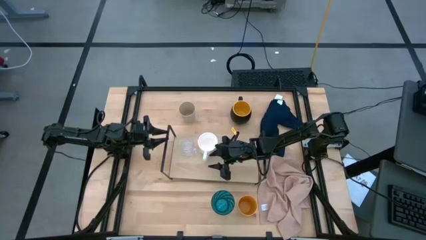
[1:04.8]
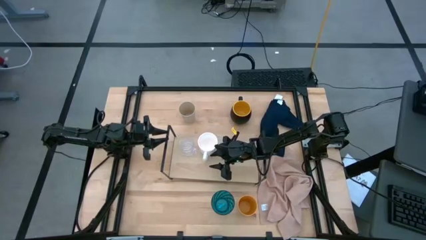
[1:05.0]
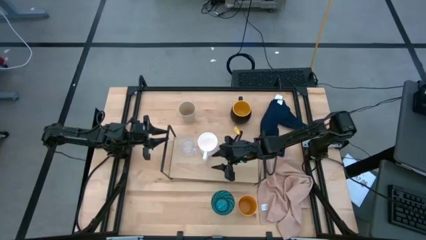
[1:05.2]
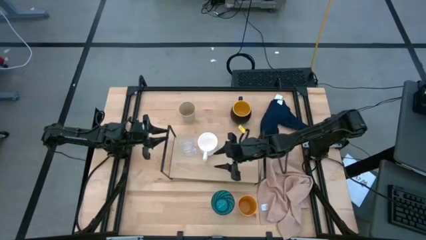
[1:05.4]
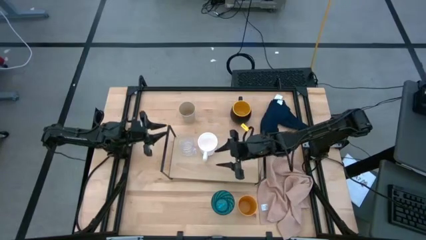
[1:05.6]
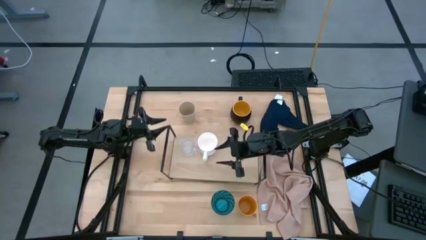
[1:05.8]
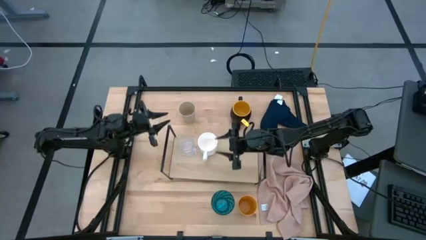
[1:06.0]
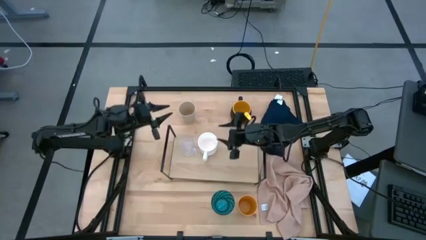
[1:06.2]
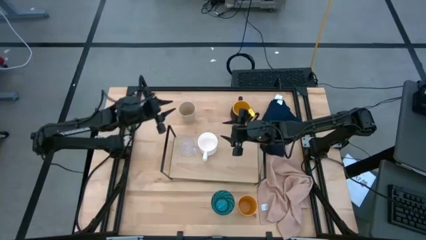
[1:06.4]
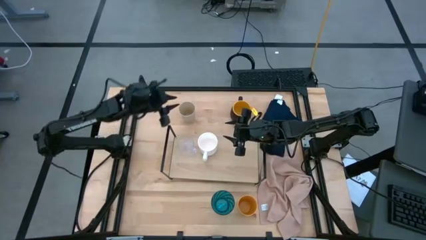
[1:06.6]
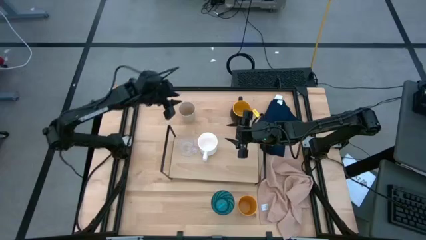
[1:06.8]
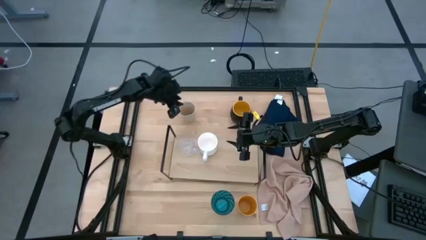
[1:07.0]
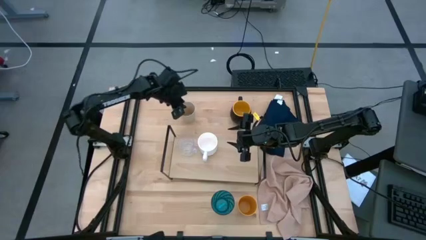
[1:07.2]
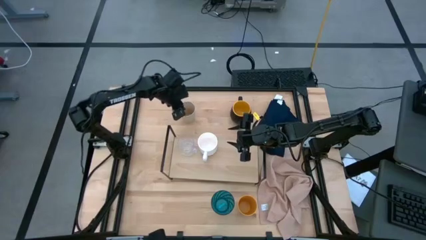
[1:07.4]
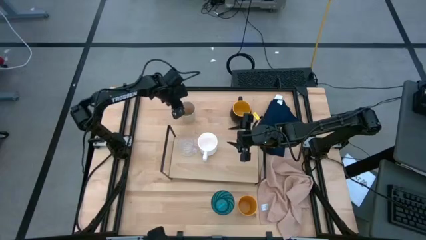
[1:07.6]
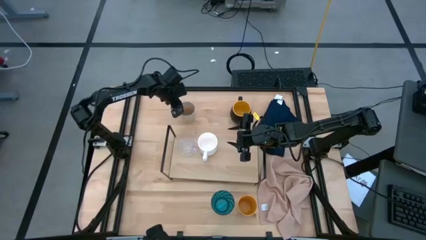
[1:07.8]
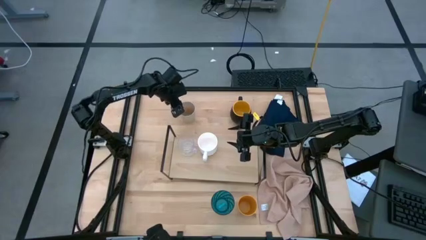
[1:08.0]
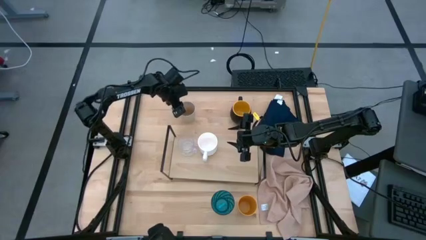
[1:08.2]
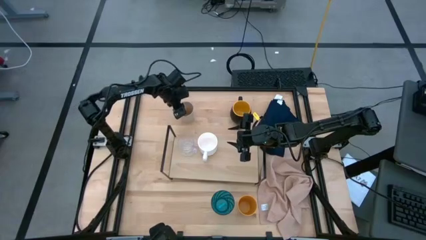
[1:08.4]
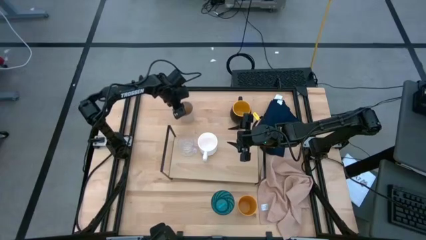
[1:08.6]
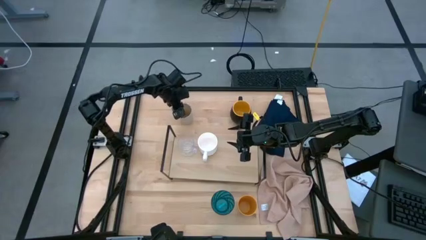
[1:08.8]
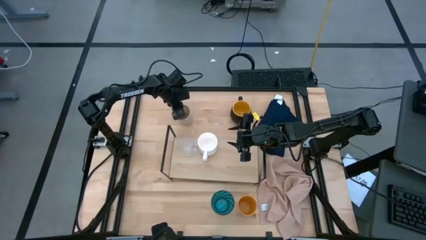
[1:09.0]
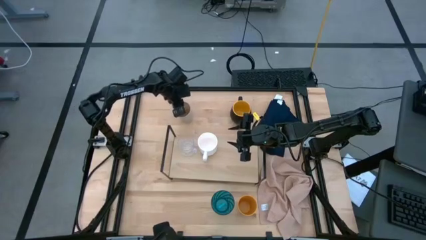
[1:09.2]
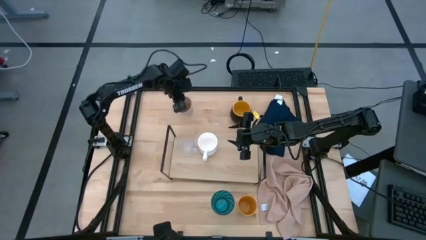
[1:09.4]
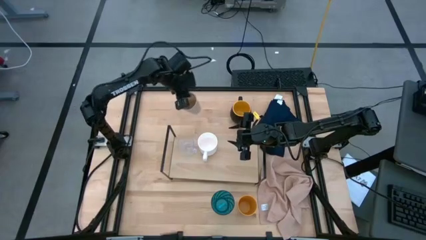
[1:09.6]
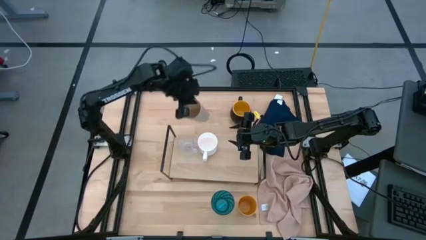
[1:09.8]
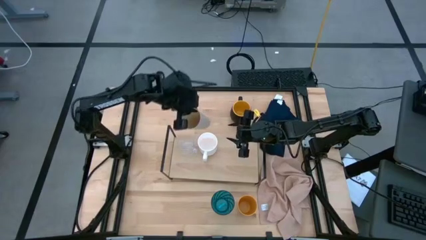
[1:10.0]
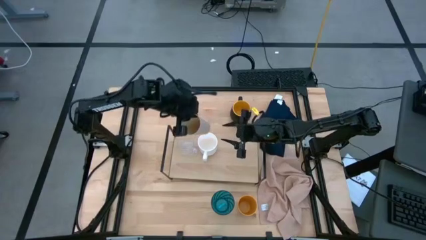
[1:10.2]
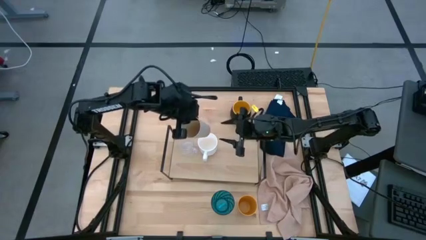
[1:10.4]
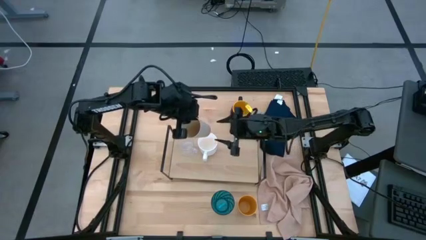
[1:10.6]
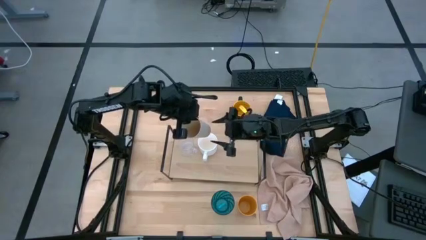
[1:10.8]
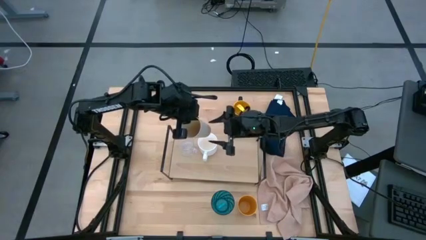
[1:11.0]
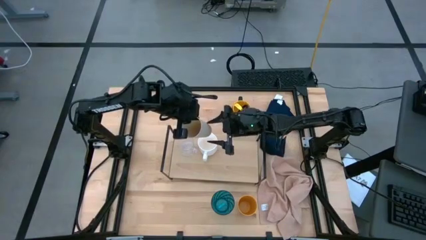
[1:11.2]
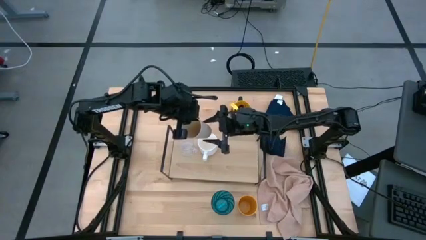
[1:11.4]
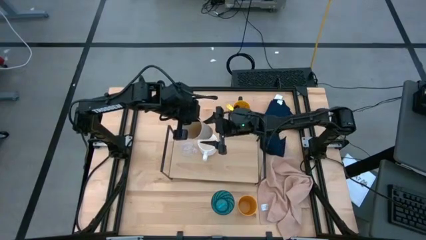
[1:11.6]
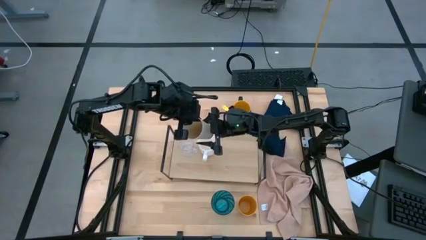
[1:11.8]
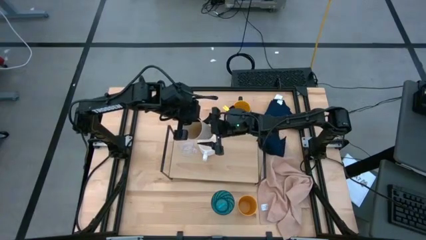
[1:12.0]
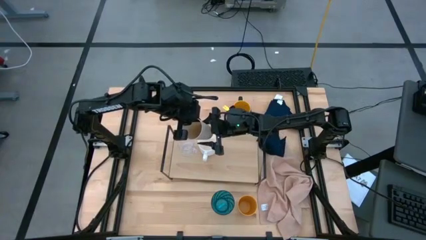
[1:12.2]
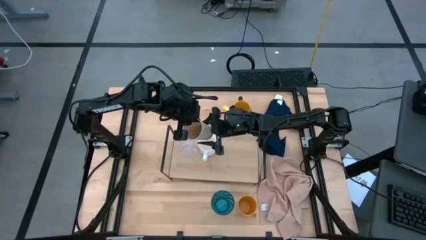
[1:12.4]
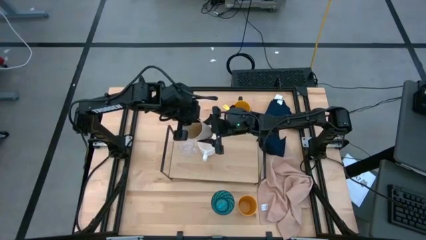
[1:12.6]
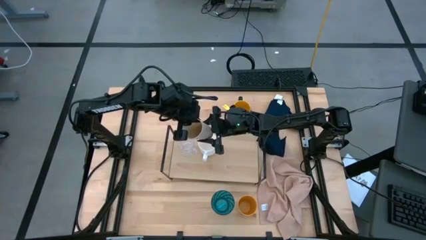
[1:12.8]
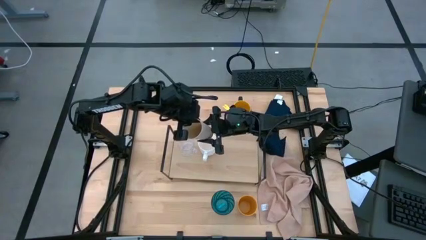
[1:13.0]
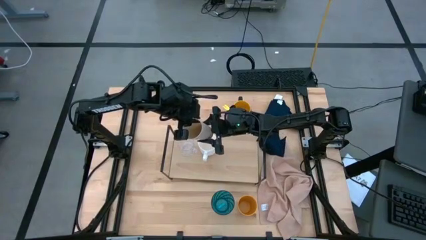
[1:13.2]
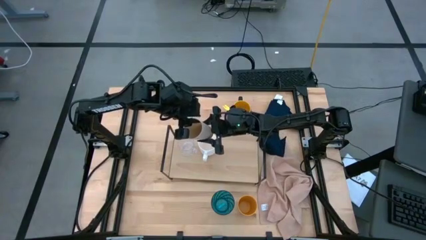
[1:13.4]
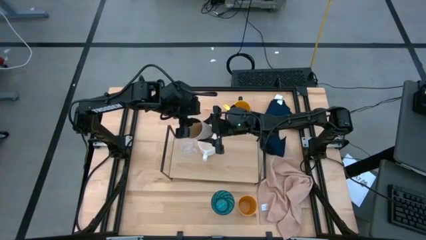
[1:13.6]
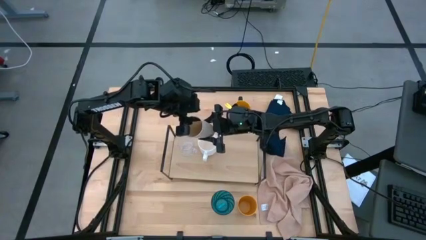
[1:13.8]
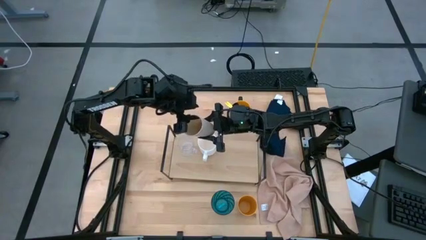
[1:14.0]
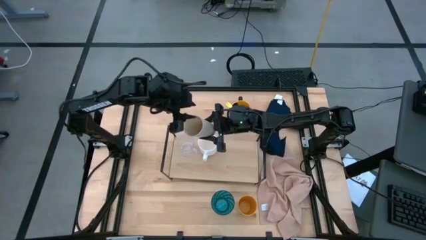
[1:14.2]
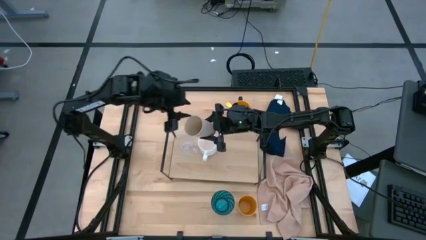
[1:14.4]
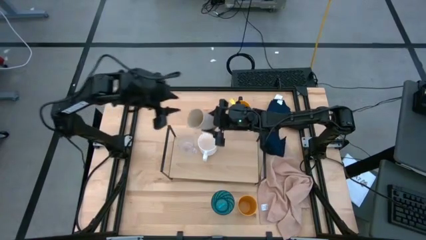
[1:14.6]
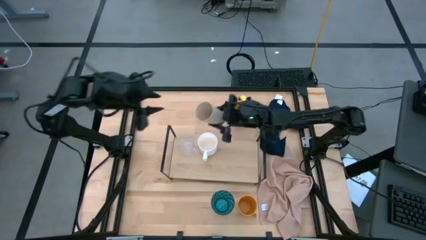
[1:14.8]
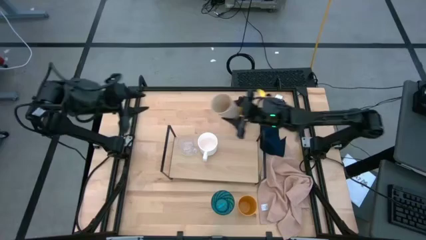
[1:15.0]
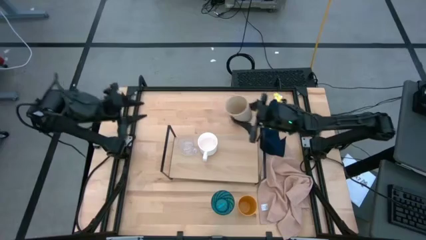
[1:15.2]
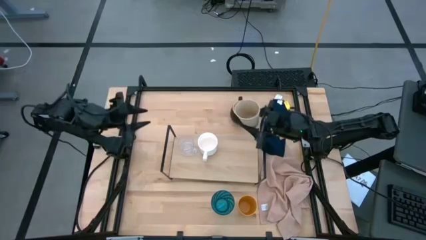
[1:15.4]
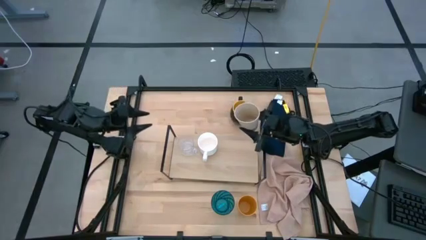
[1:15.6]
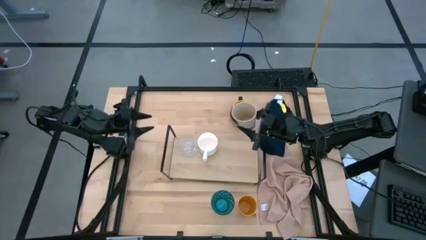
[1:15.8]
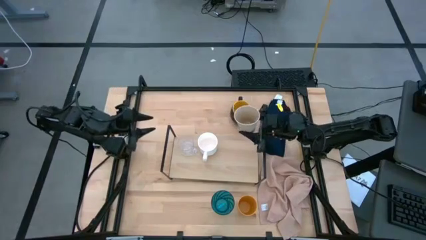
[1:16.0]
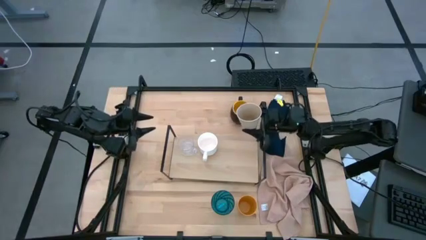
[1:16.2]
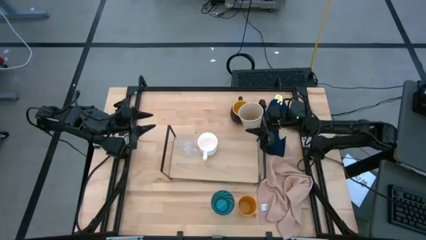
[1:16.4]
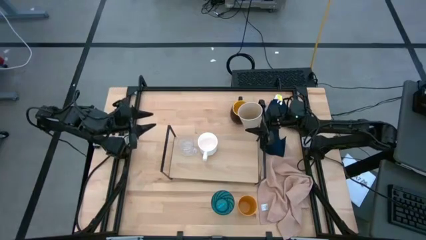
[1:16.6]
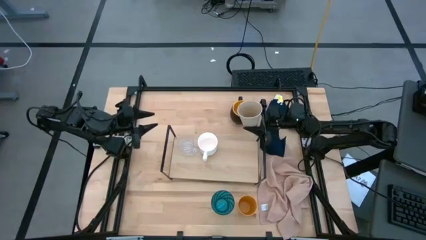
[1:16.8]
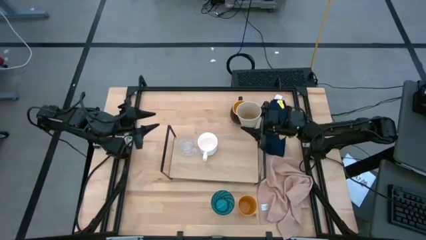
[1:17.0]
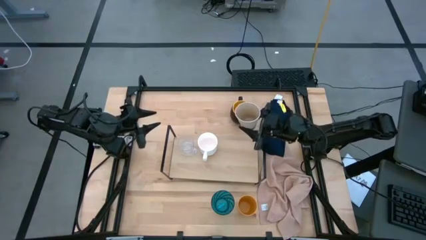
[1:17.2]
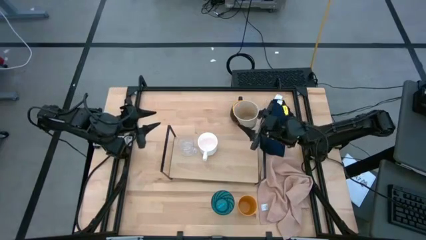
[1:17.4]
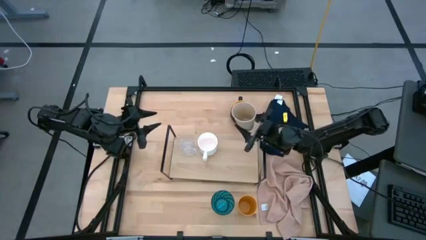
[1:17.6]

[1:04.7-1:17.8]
Task: Stack small to large cups/mugs on shelf
Put the white cup on the shelf

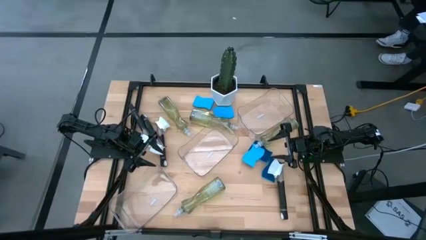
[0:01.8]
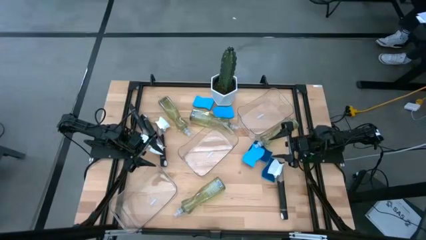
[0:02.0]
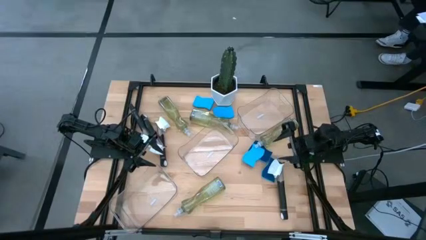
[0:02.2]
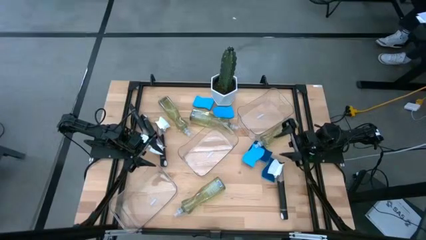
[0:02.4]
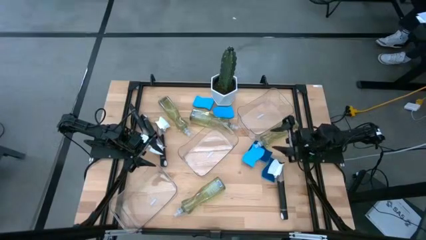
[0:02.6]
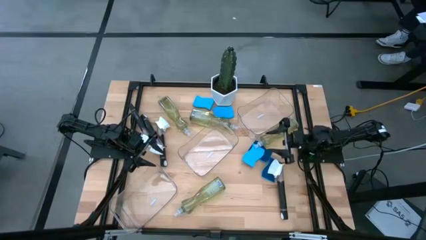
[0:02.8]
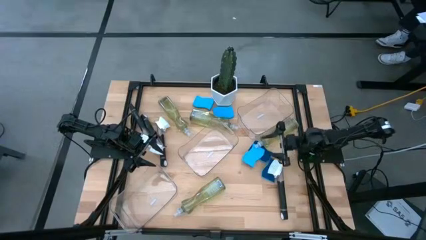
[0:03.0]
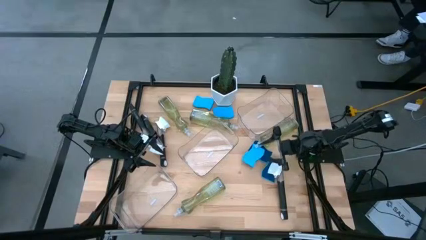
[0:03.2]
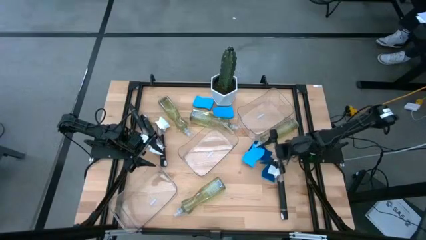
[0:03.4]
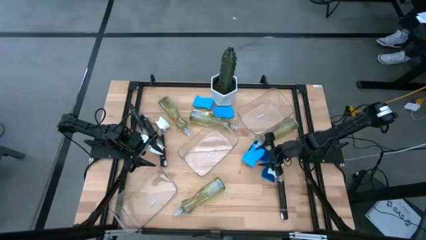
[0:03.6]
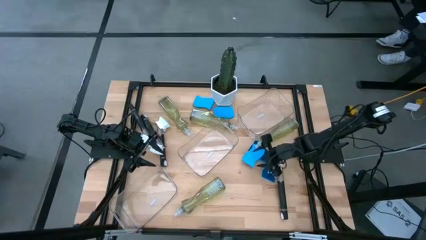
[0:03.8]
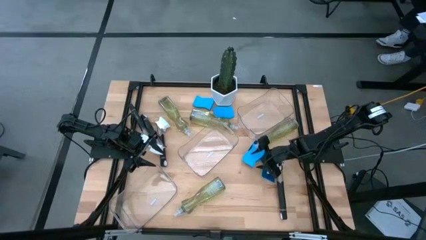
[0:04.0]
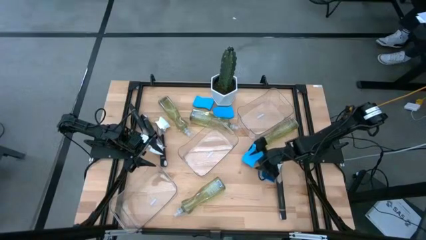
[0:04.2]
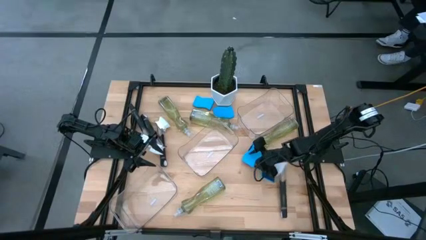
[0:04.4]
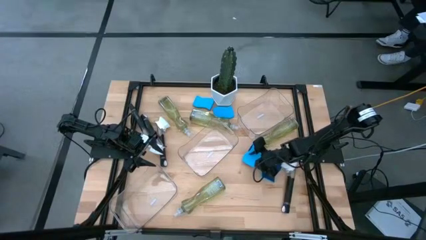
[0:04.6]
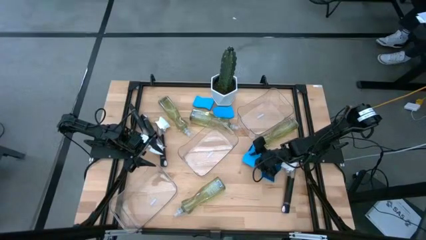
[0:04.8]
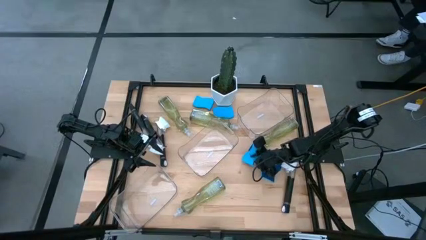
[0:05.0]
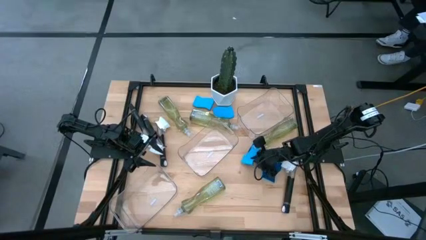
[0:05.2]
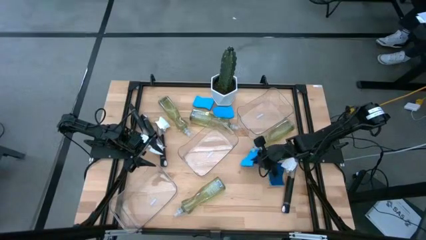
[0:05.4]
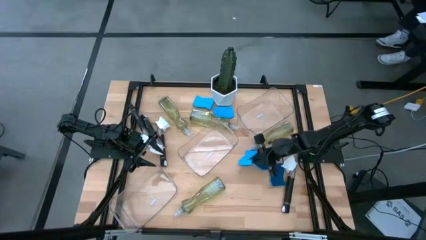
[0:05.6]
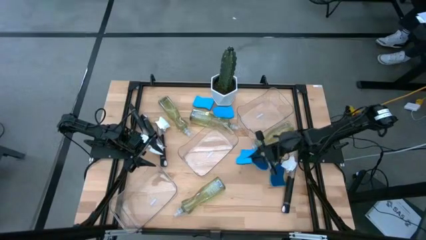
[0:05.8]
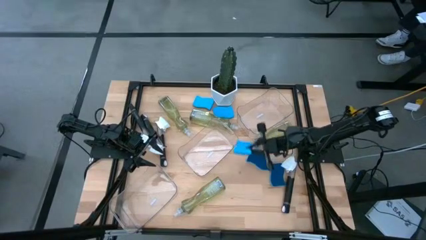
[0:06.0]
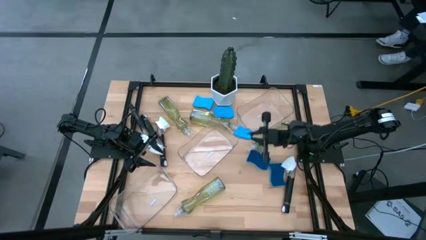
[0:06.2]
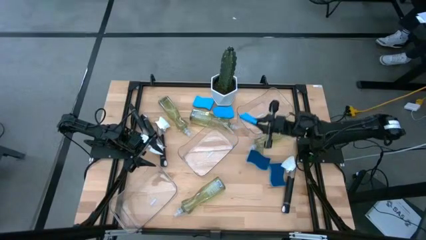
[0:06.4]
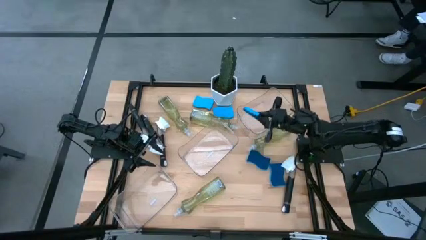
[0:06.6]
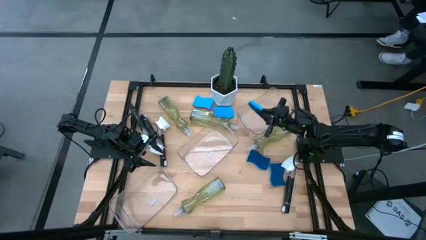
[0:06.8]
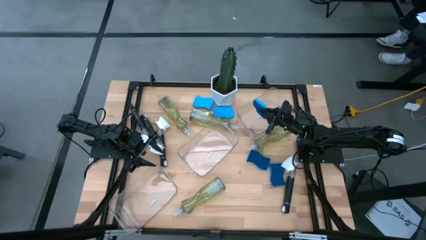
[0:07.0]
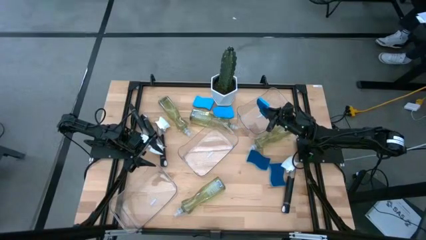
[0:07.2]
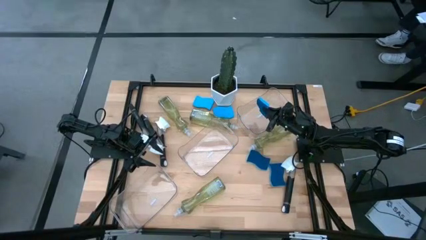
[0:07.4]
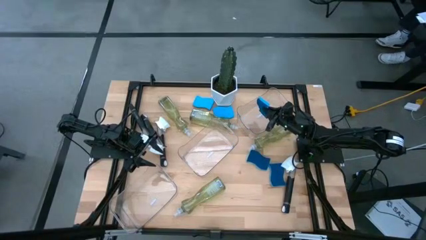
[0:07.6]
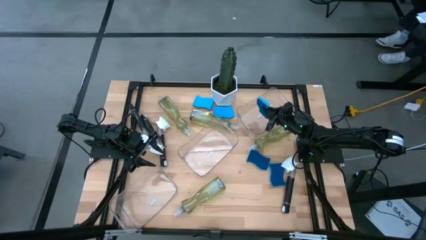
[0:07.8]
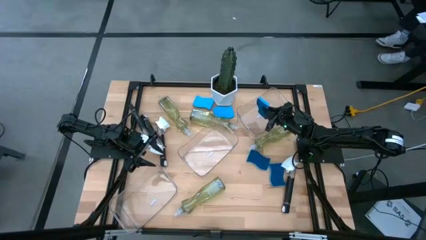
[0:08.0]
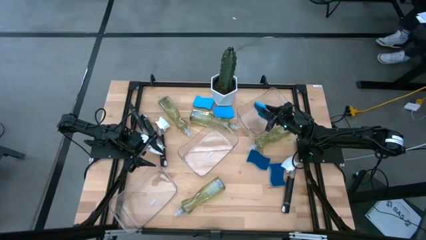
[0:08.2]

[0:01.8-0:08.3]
Task: Pick & Place Kitchen Sink Supplies
Put the blue sponge into the top transparent bin
